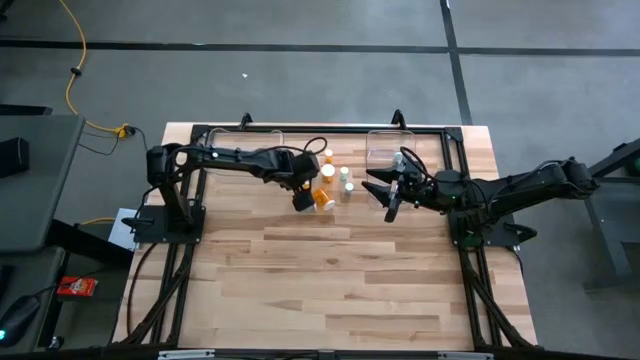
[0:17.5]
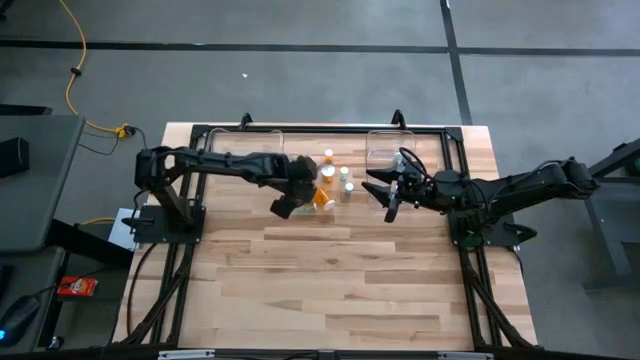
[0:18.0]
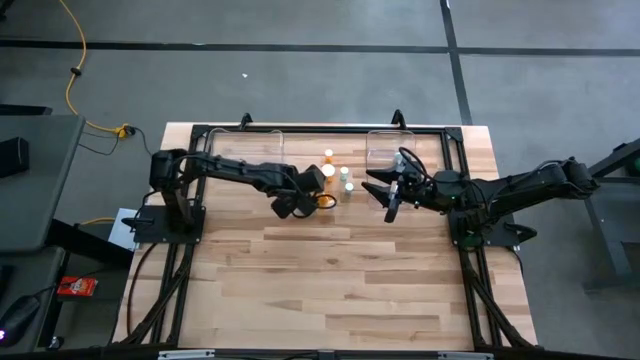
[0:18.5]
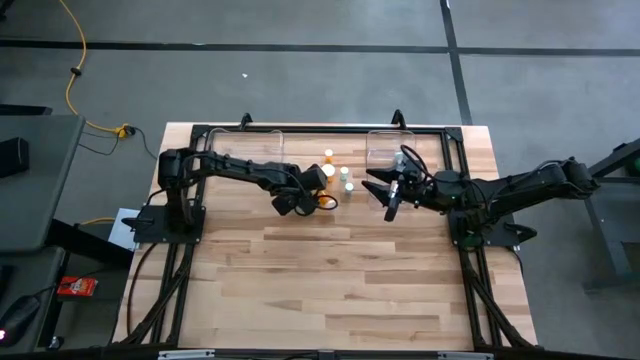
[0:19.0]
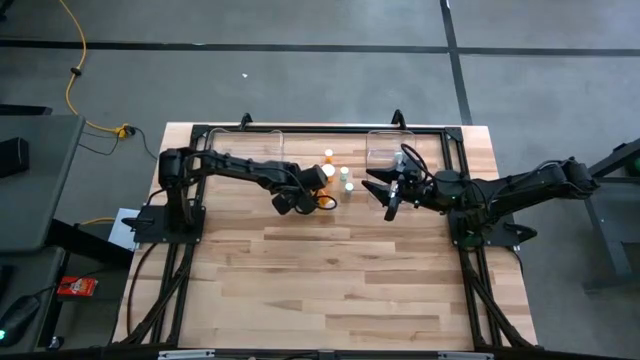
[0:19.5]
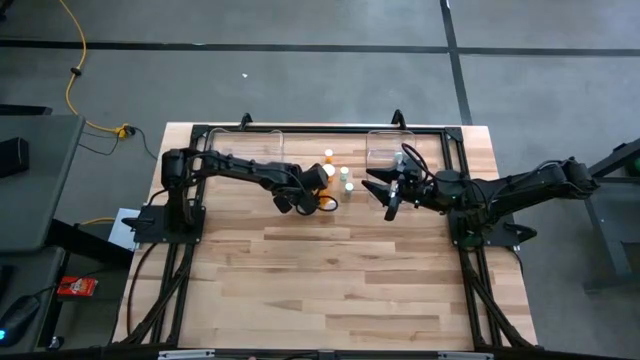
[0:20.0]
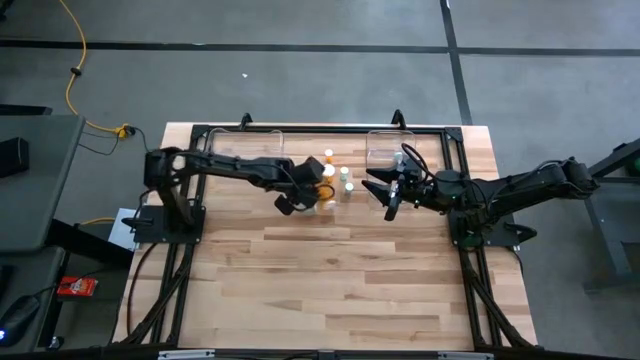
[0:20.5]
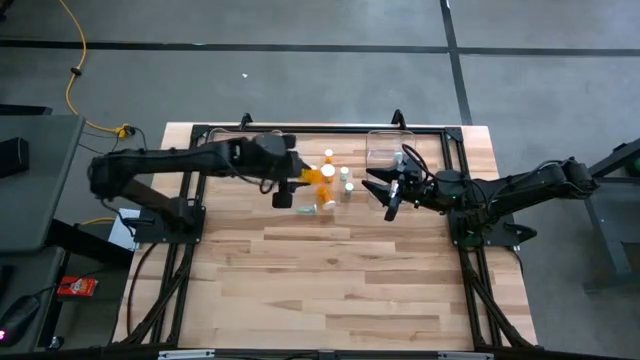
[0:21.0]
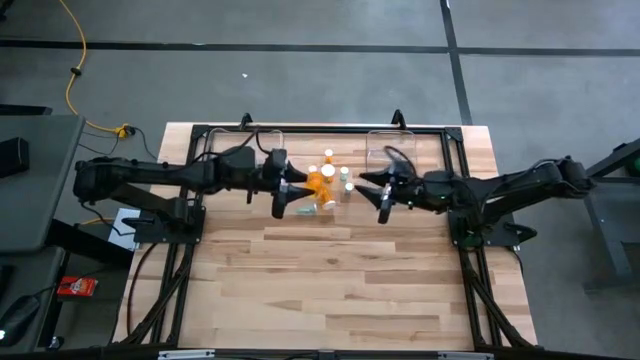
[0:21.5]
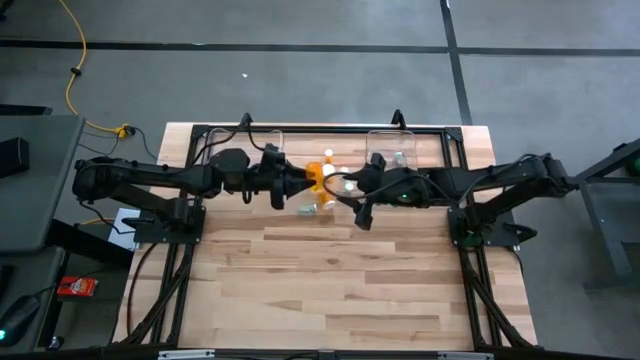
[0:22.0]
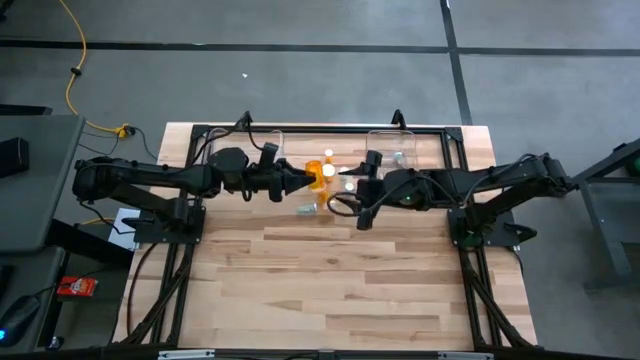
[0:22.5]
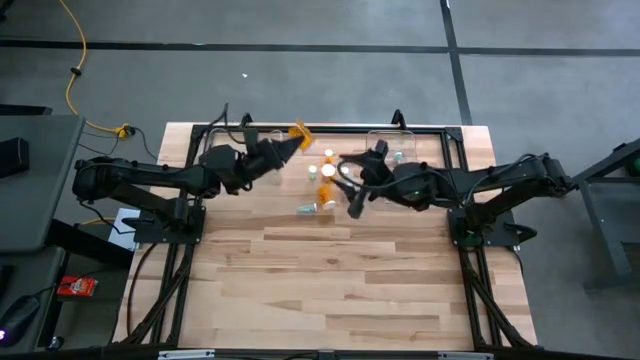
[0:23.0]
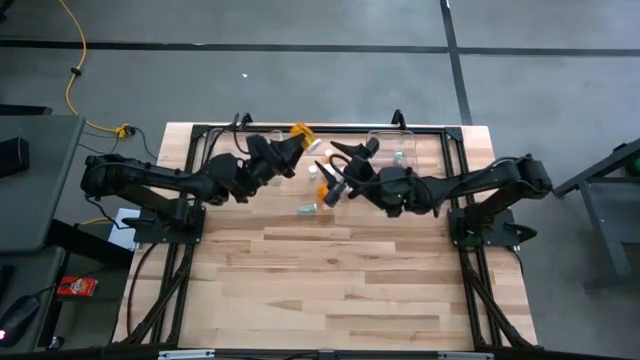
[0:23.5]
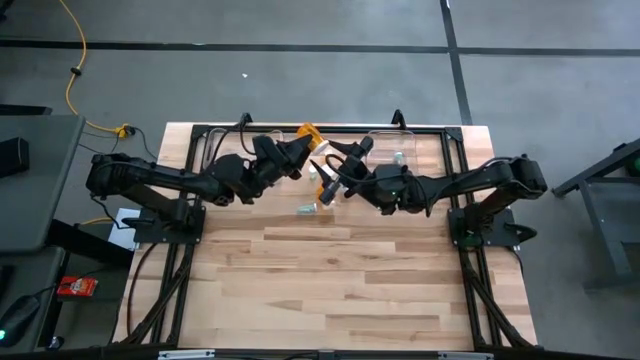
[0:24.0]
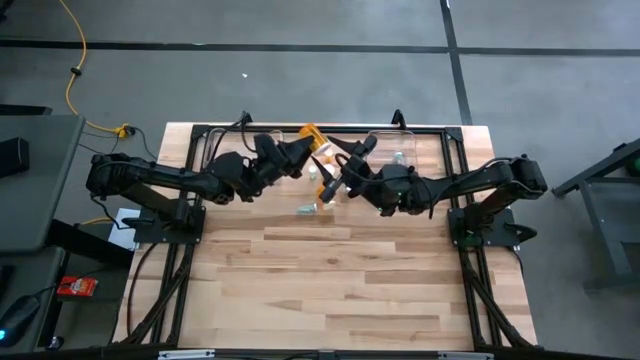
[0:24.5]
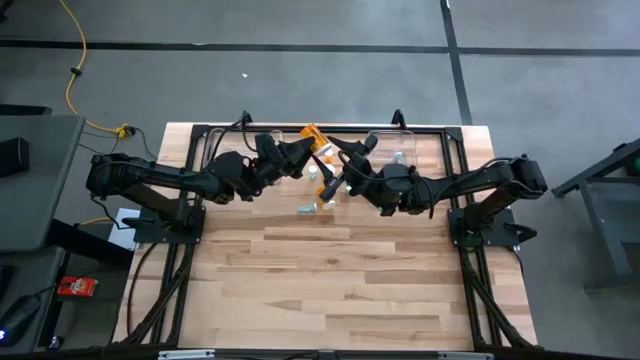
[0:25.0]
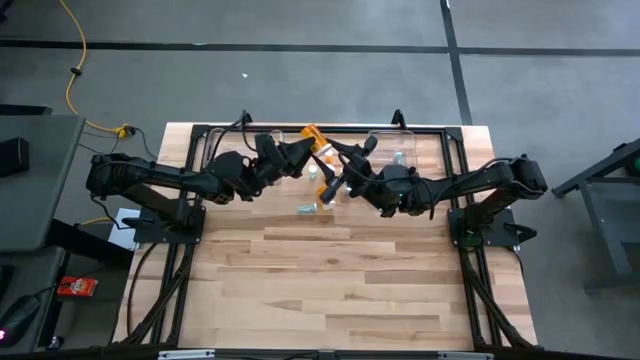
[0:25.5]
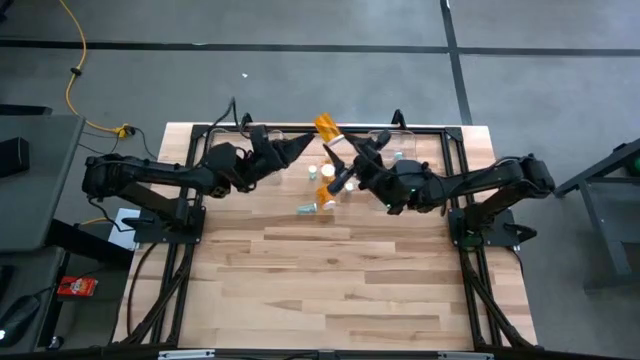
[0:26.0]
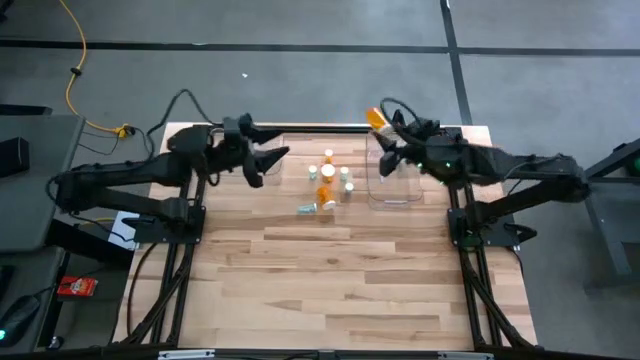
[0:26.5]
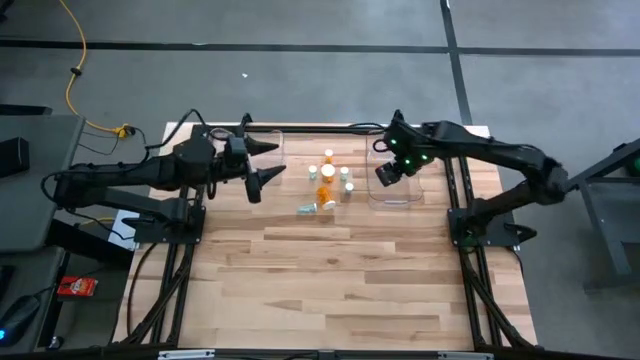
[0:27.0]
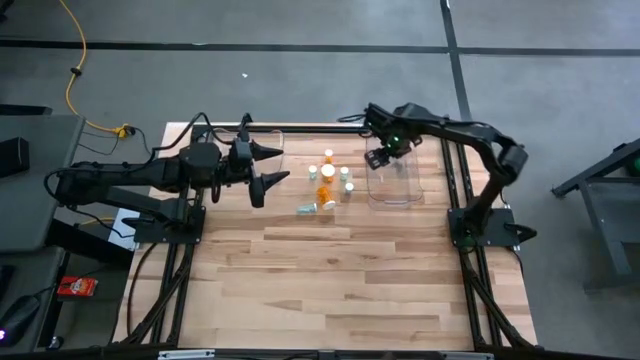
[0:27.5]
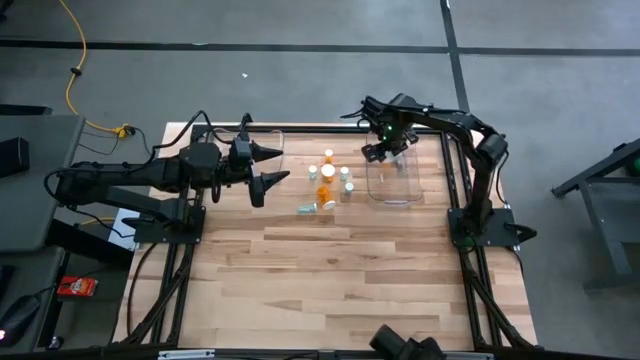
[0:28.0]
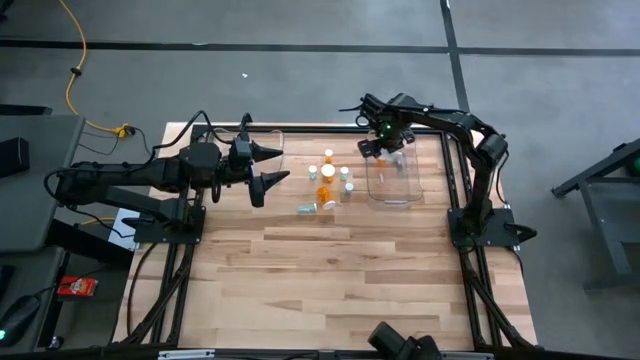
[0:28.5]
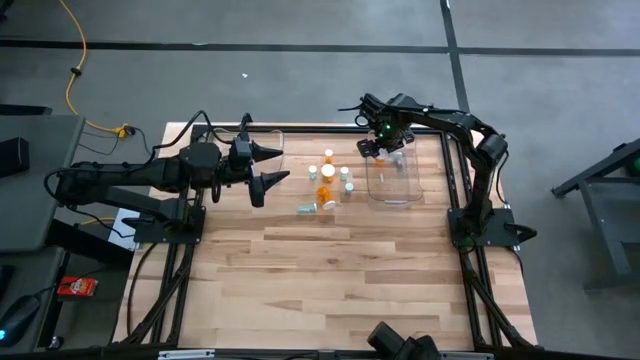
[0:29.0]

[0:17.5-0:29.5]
Task: Pick and place medicine bottles into bin by pill shape (circle, oval)
Put the bottom left orange capsule bottle into the right transparent bin

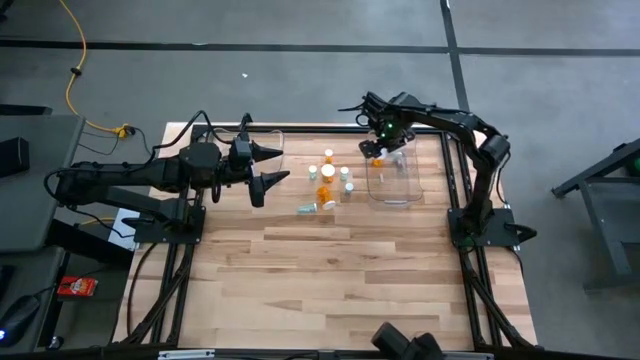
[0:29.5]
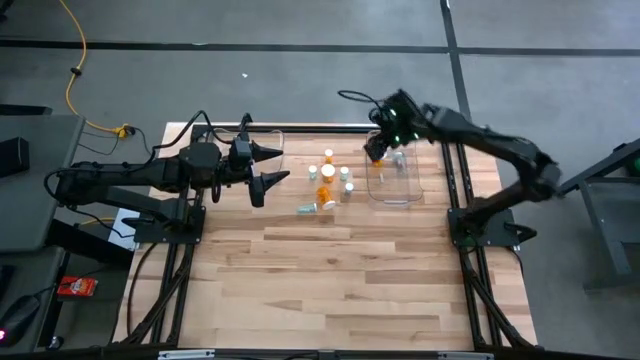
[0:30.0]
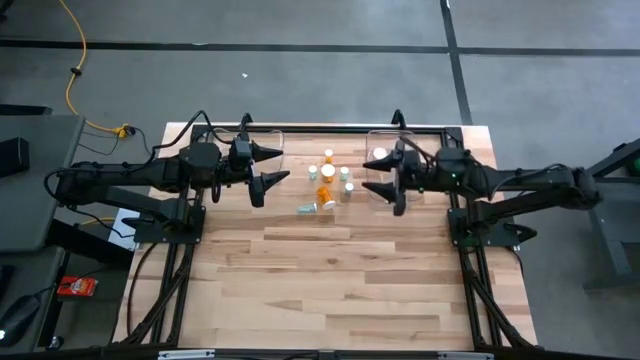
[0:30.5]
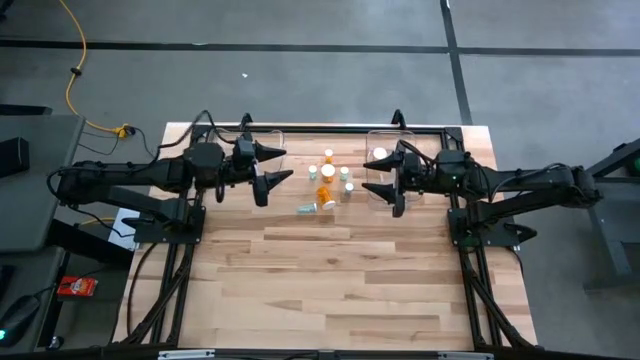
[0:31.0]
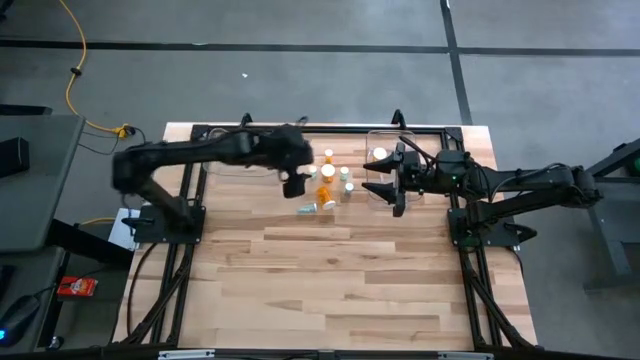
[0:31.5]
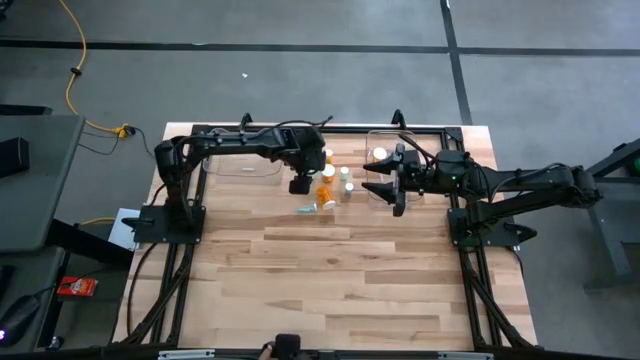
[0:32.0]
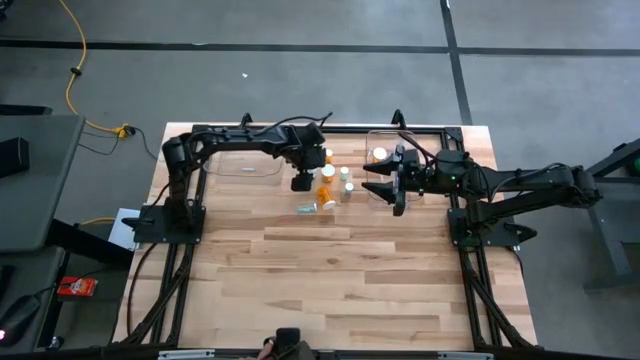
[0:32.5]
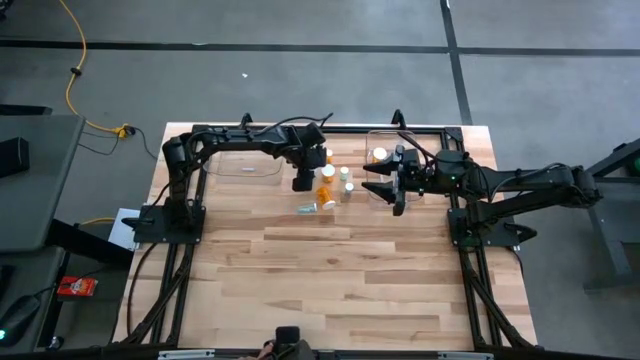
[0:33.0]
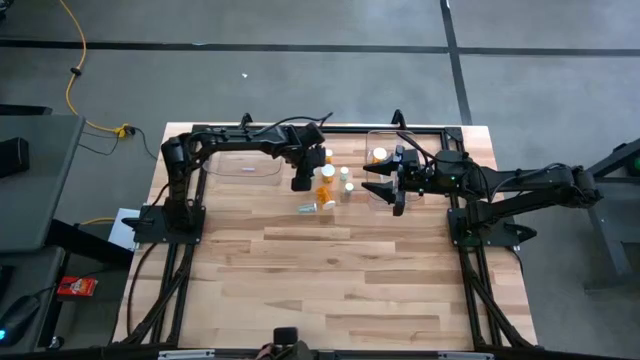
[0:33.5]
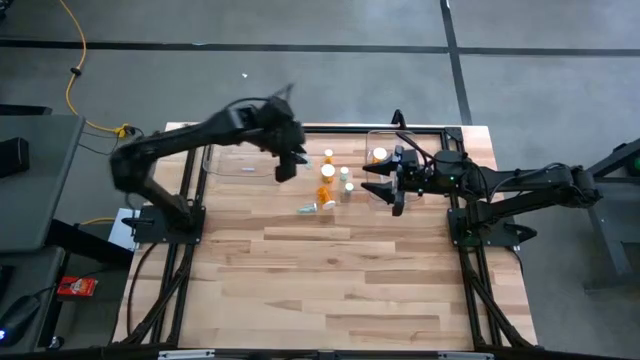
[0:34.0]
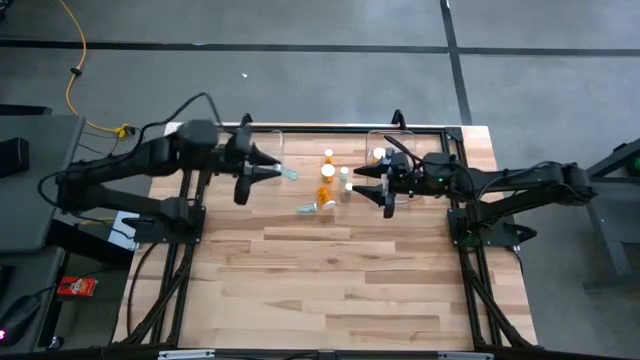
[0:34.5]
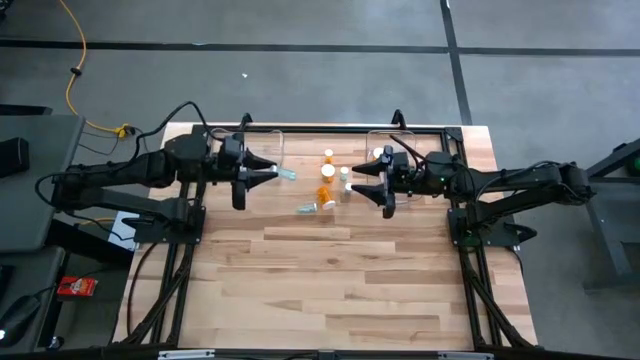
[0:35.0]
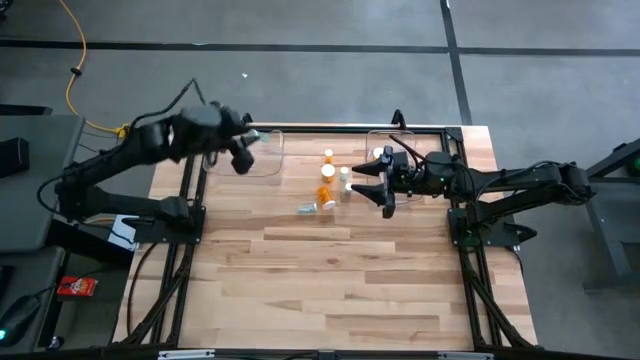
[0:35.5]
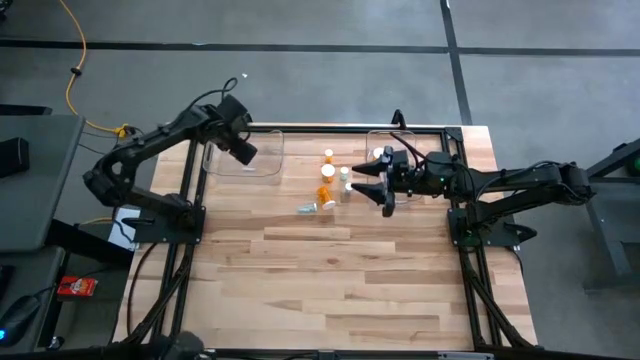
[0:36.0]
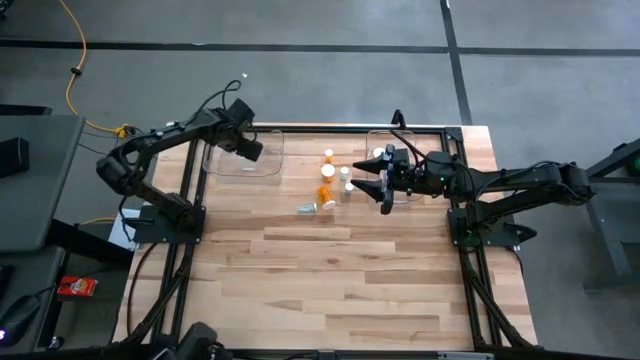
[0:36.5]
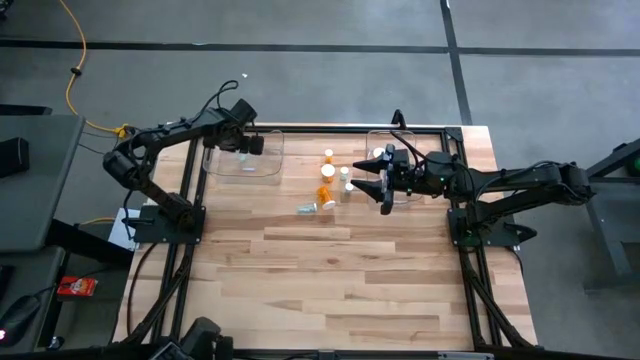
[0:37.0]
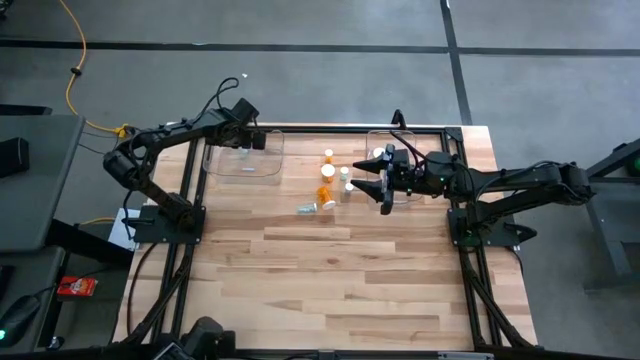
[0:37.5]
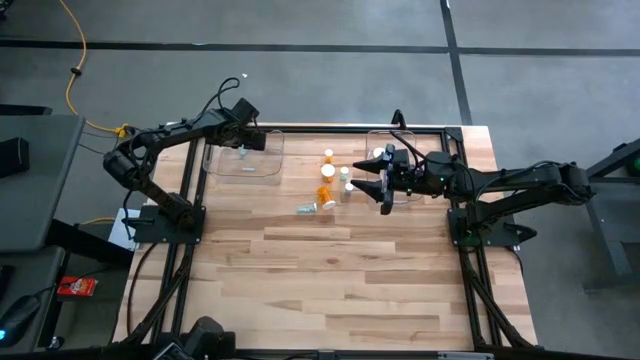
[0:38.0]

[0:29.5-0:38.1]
Put the blue tablet bottle into the left transparent bin

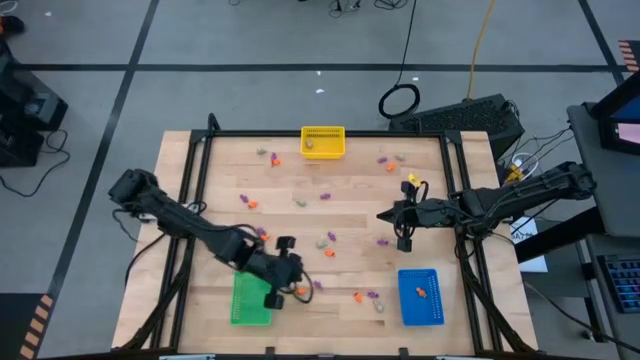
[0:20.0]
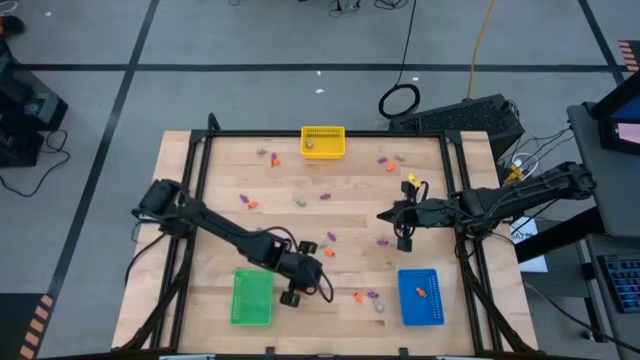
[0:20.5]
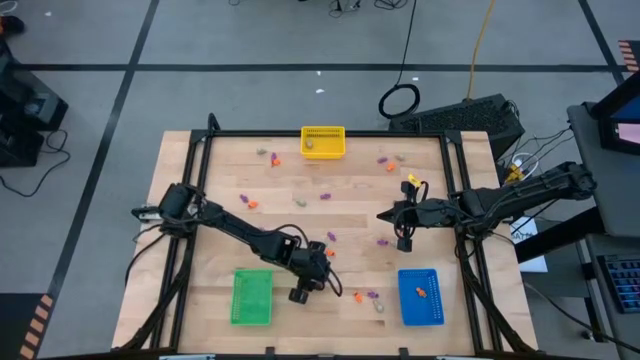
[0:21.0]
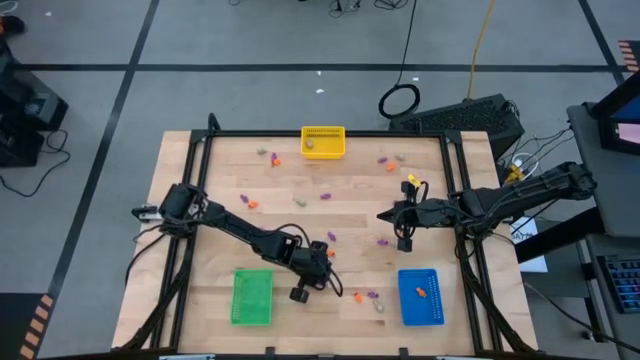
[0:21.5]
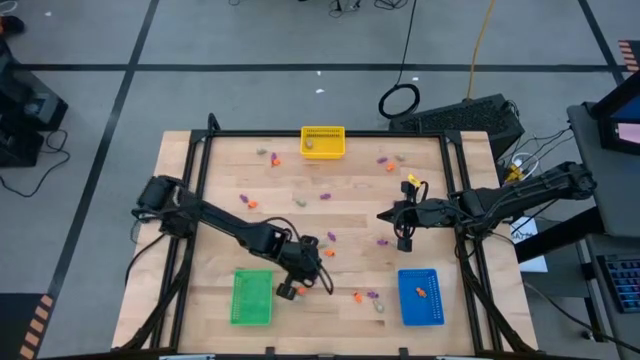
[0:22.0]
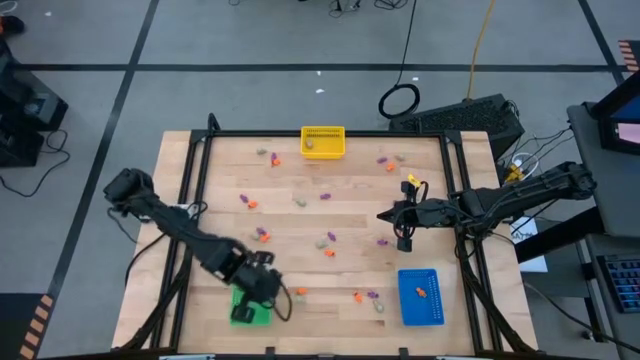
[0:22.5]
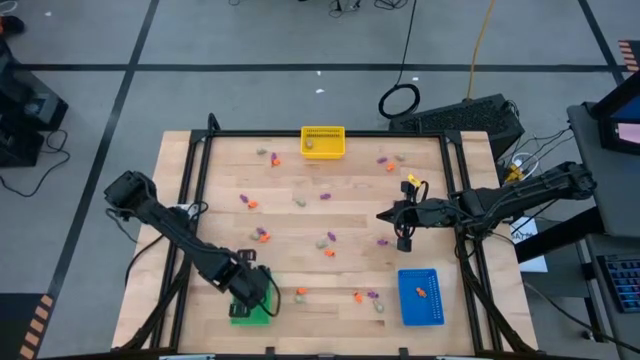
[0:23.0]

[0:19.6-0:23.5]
Task: Sort Halloween decoration
Put the purple skeleton toy into the green bin
